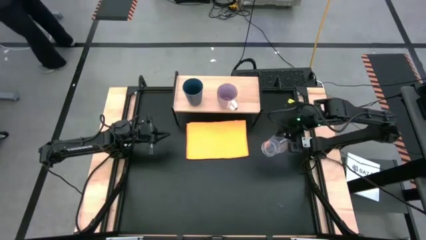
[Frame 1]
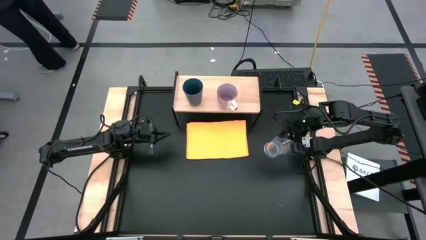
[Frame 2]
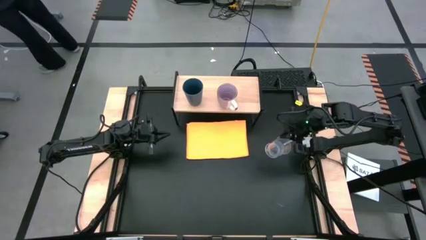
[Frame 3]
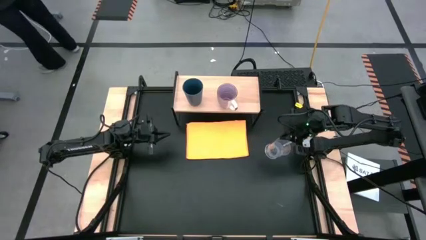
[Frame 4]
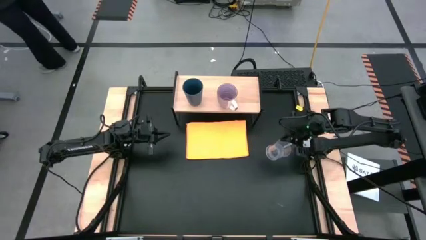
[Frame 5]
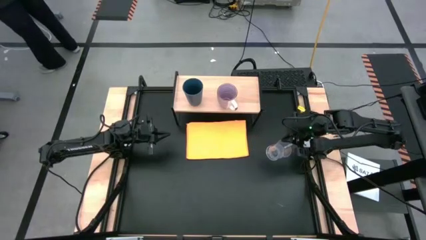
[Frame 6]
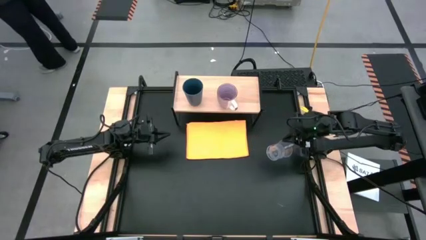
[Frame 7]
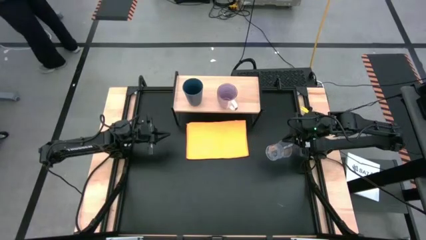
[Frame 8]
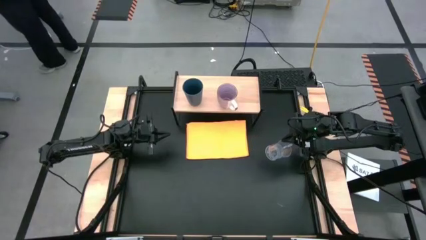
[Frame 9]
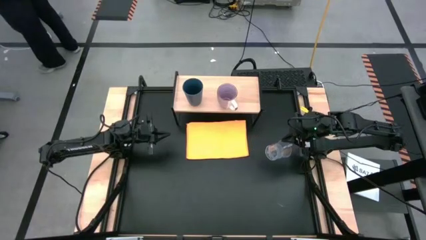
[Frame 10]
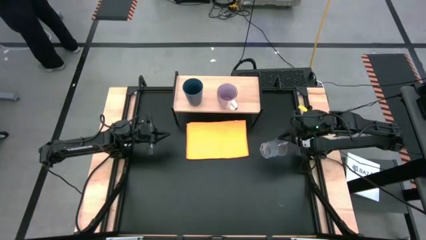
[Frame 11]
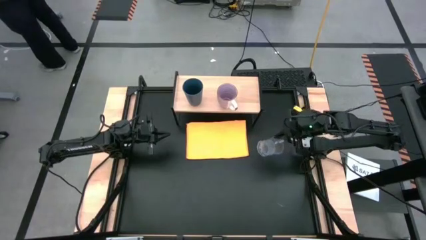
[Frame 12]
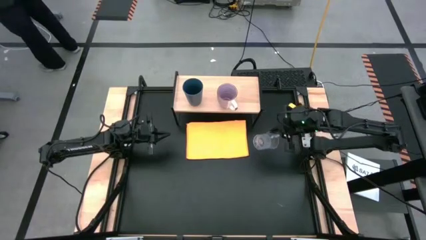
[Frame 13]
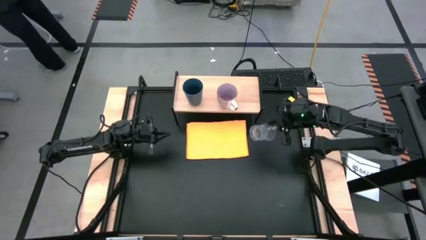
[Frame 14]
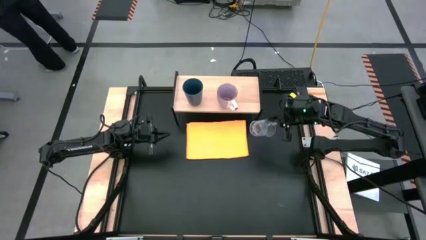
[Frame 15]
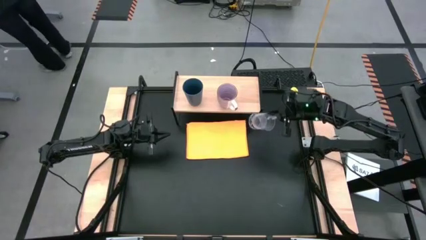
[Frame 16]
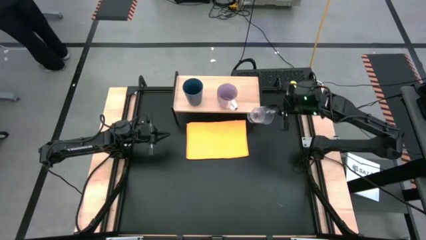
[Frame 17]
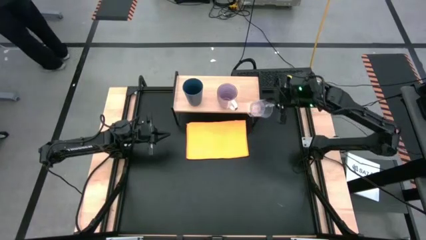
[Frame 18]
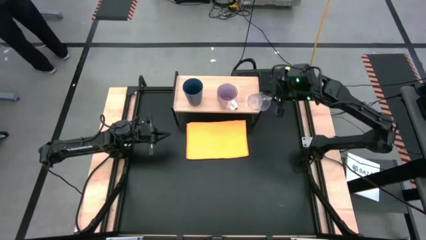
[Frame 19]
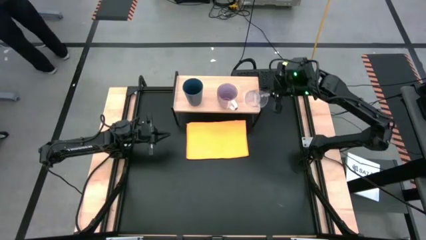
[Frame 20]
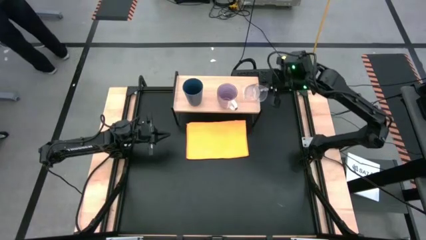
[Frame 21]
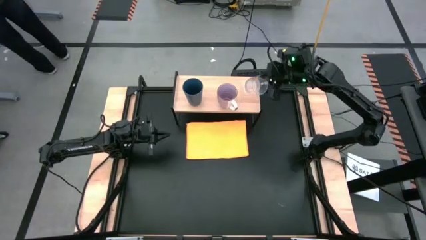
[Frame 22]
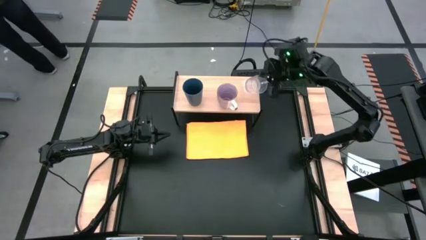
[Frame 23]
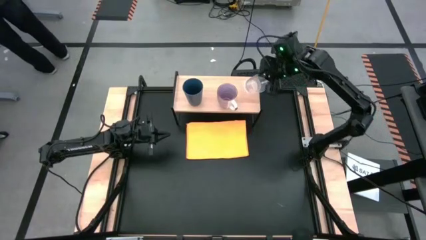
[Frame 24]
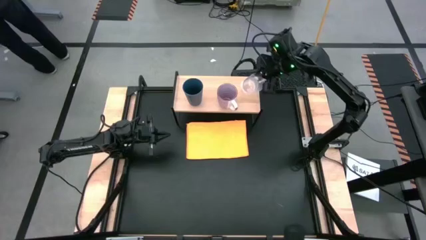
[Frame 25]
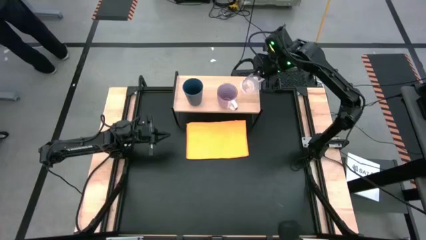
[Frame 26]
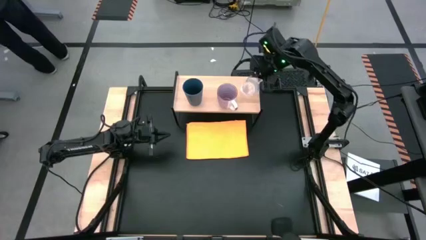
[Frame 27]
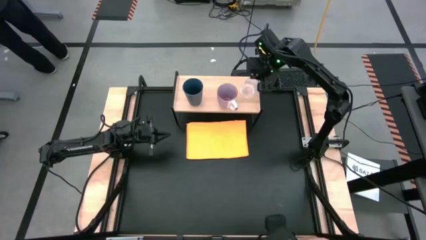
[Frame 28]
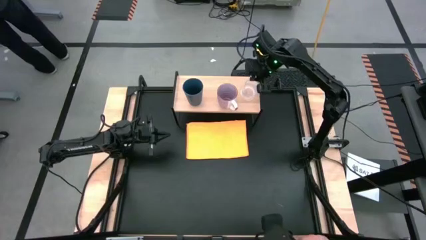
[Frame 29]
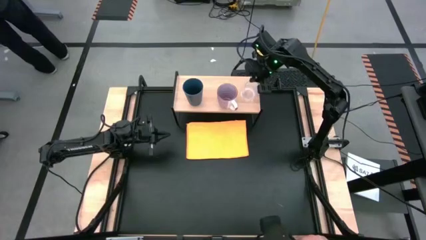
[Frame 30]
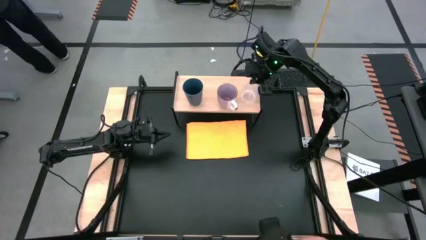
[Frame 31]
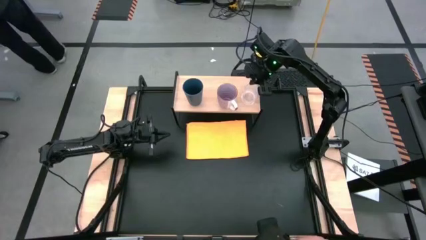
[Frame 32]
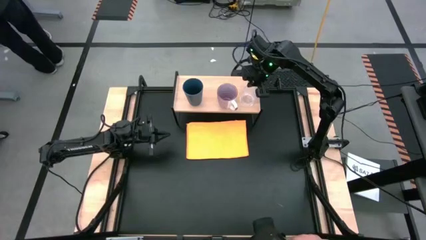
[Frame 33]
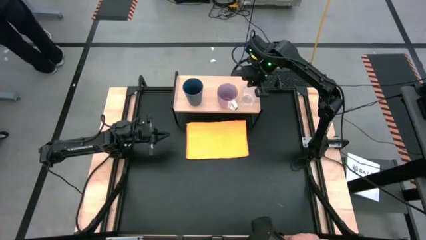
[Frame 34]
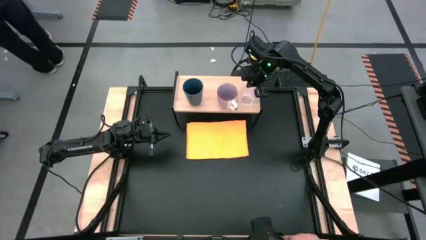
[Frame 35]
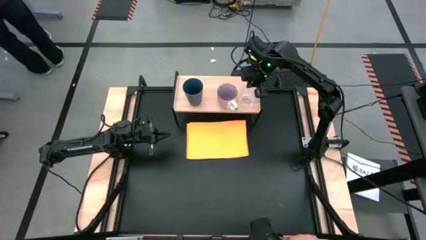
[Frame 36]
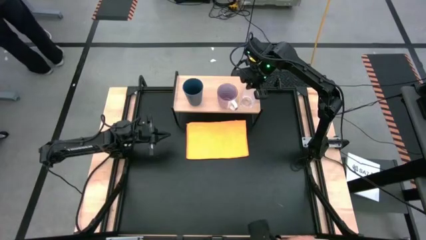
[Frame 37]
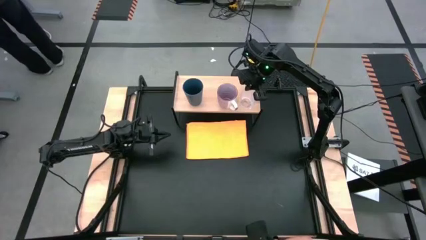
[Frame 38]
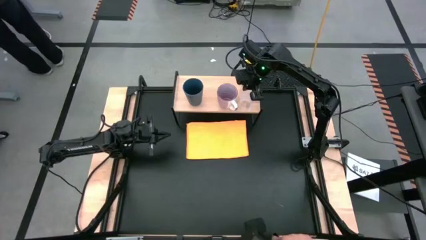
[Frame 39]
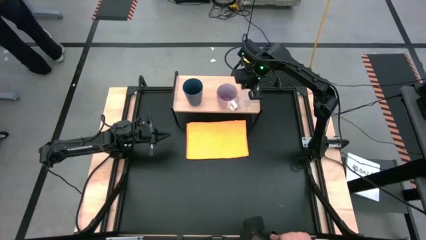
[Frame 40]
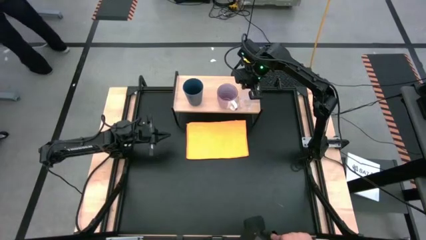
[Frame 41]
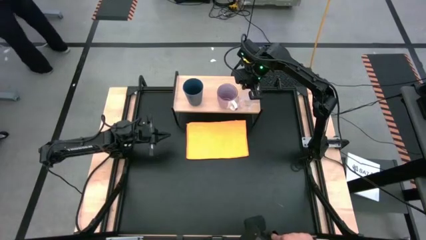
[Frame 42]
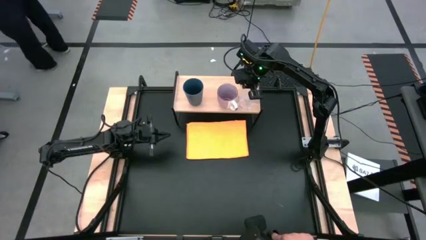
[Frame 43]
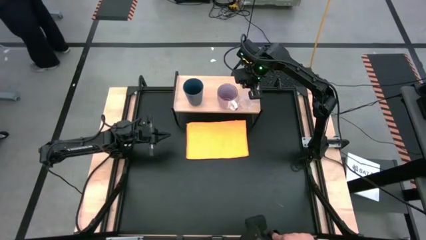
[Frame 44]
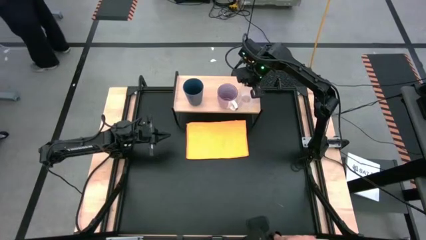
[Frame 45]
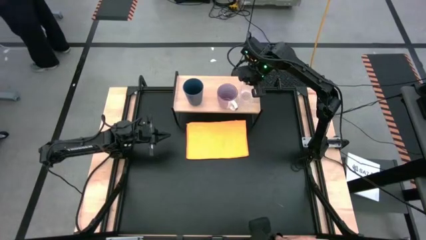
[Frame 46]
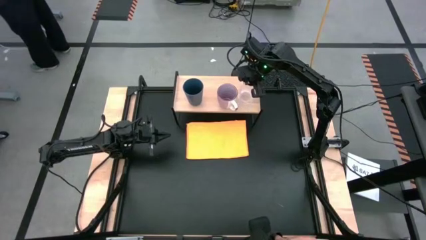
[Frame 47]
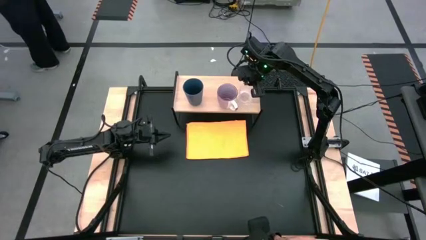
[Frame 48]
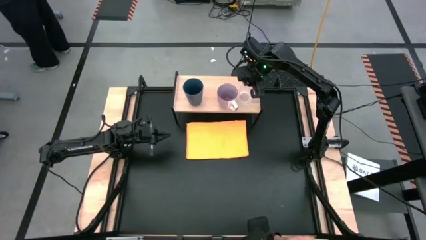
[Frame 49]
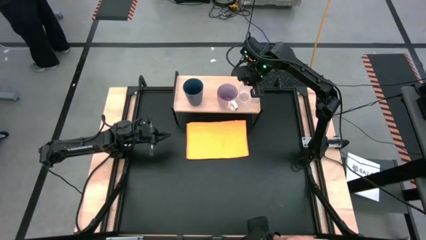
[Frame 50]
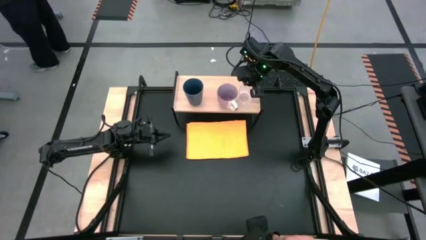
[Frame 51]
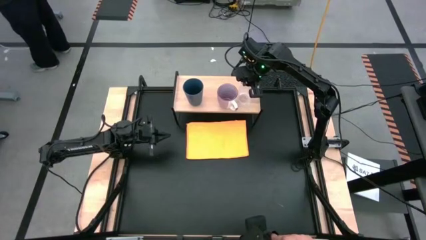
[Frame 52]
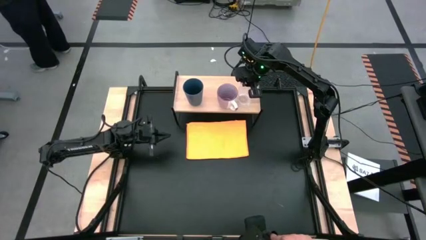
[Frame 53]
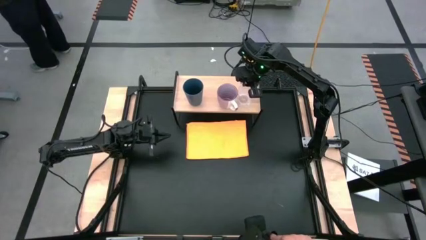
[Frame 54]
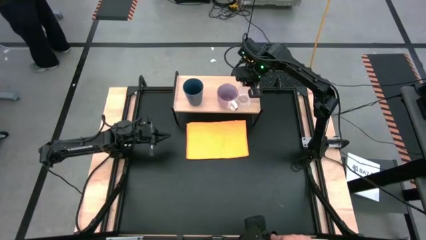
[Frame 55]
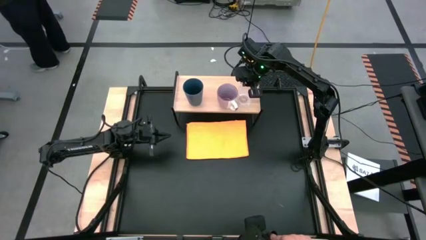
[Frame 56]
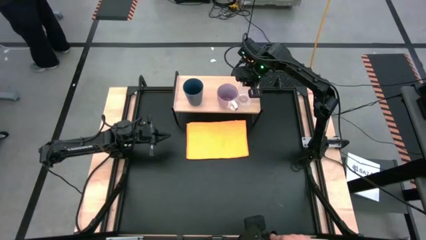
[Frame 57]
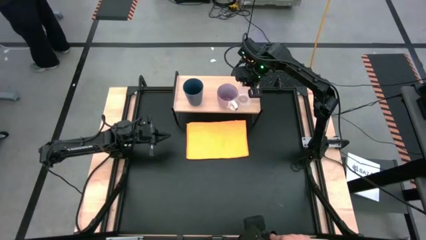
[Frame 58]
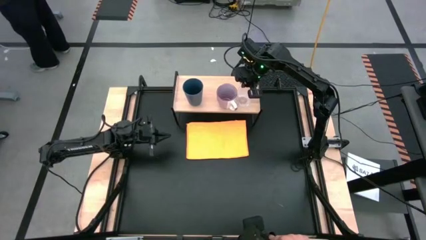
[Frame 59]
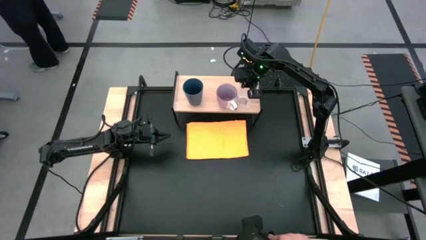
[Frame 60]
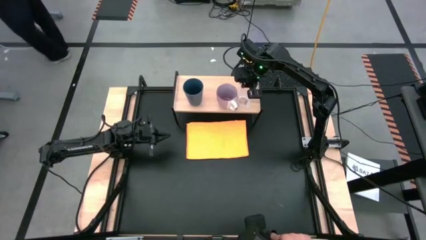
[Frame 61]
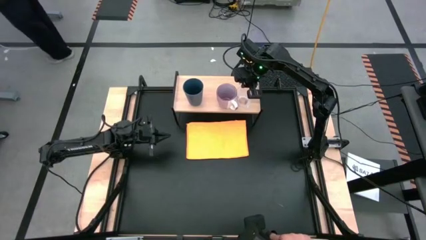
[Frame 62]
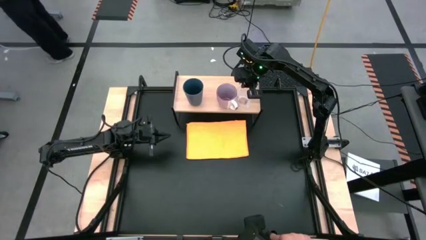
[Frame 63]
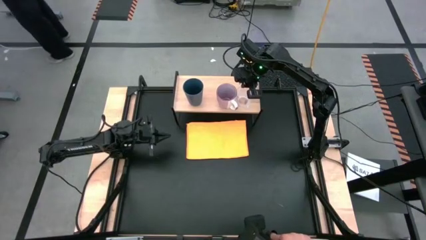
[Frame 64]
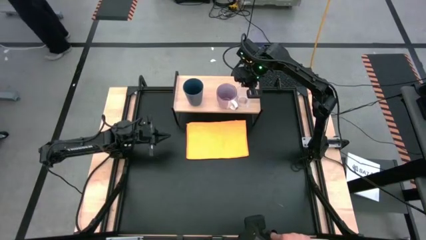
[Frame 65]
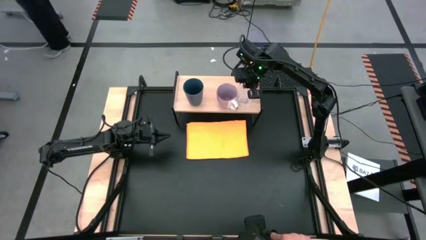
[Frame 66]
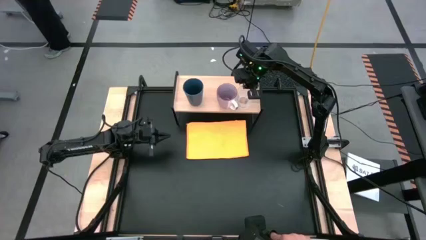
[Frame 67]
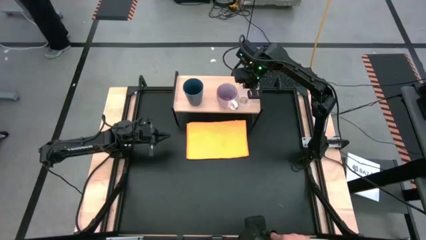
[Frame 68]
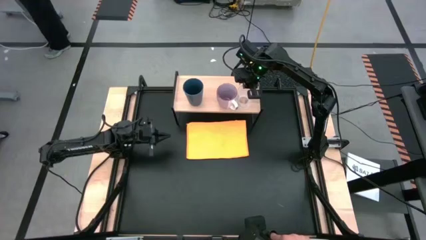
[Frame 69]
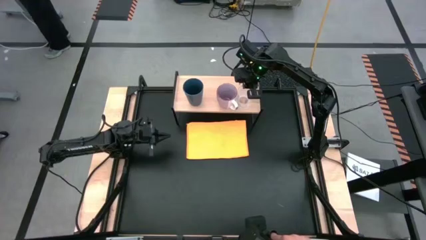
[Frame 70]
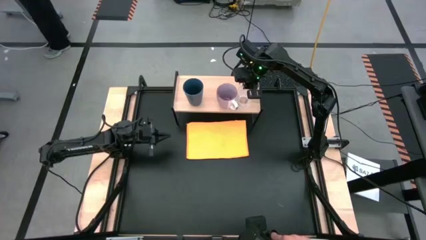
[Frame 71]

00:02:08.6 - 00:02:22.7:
Task: Stack small to large cups/mugs on shelf
Put the transparent mug on the shelf

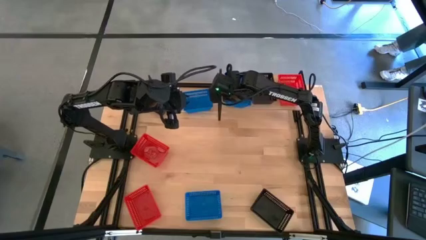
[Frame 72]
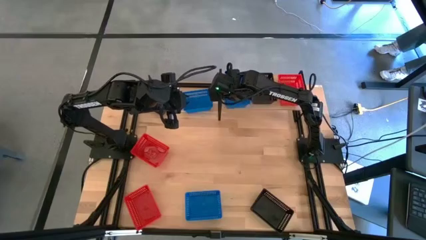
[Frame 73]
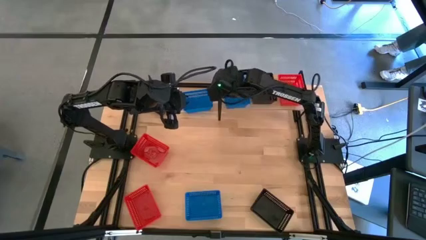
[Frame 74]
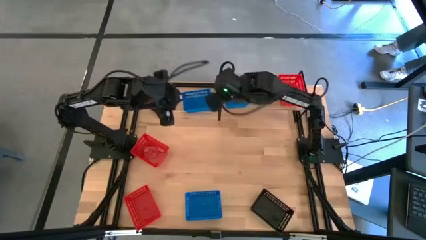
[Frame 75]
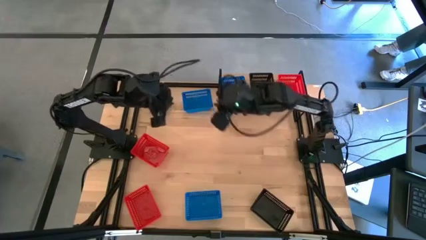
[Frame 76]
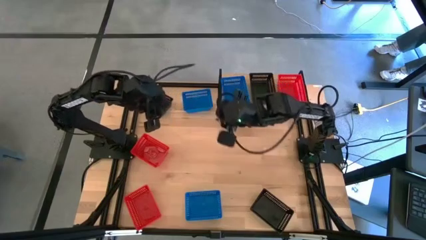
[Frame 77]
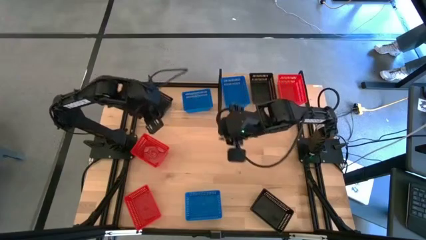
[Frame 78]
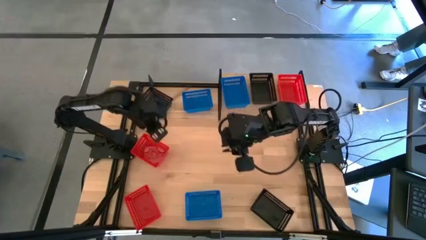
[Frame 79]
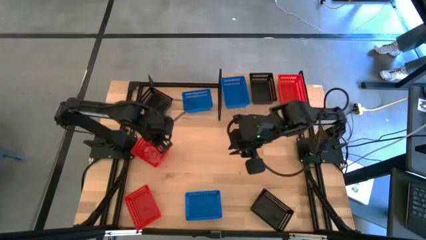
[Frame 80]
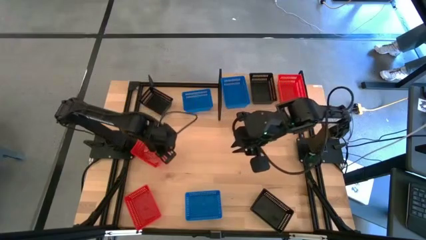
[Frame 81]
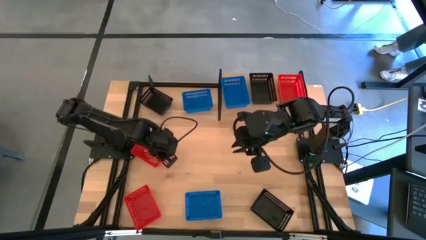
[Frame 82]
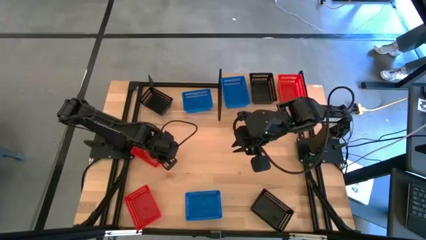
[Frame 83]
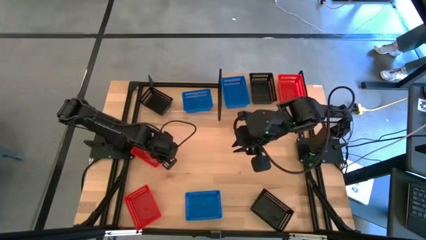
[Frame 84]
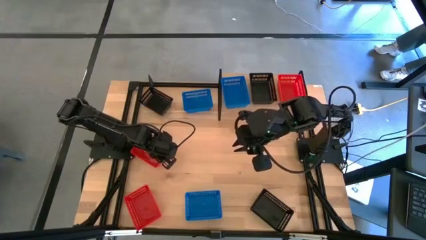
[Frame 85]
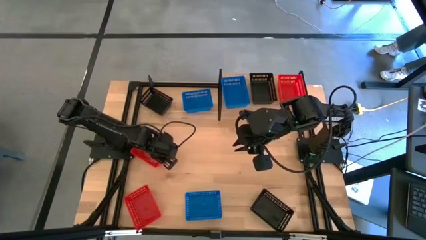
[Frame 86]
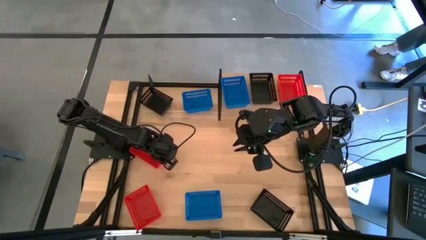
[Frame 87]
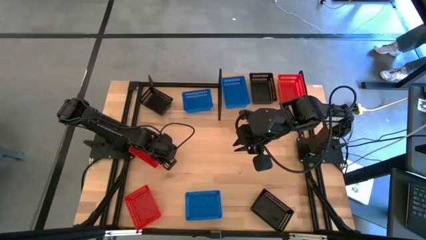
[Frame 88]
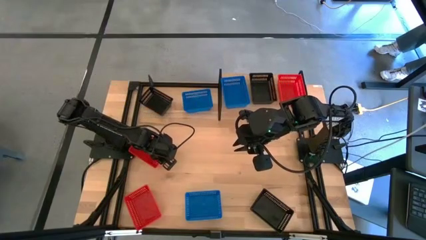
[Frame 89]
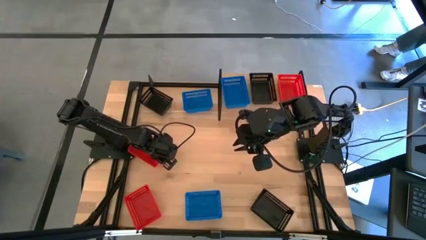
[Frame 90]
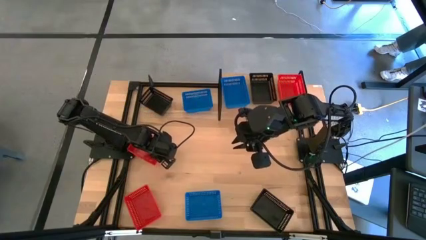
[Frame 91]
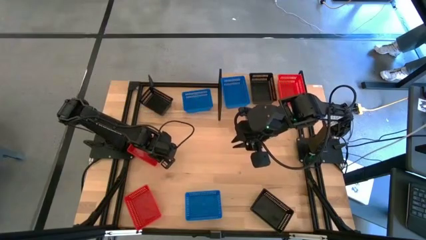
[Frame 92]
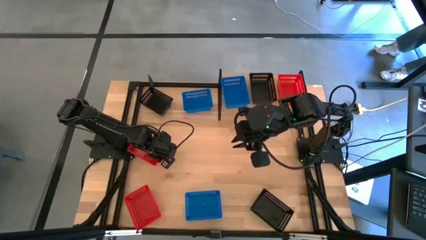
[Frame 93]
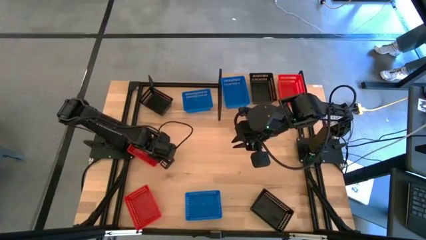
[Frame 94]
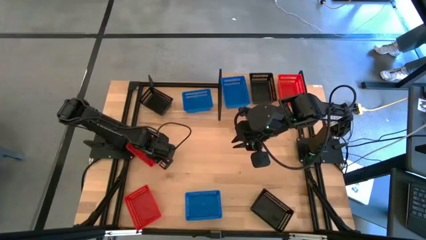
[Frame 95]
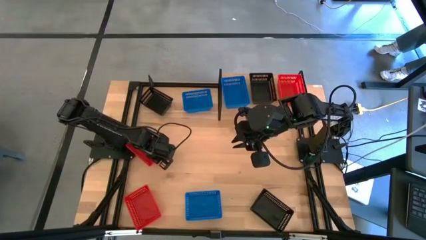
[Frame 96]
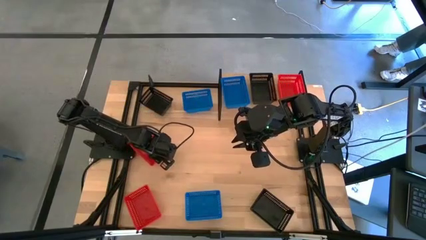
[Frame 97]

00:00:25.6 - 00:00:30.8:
Task: Stack baskets on shelf by color
Stack the top red bin on the red bin on the shelf
